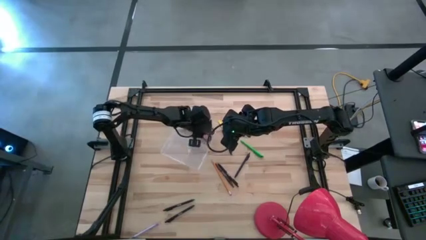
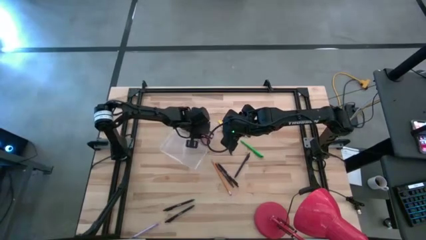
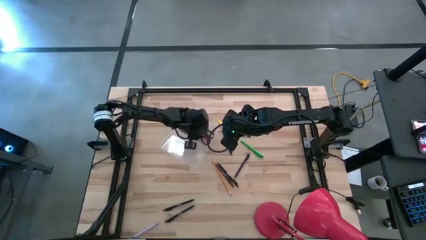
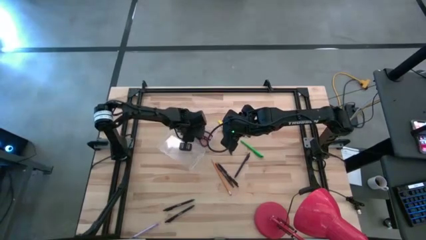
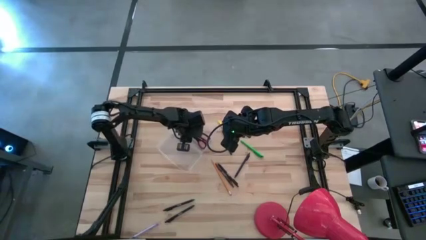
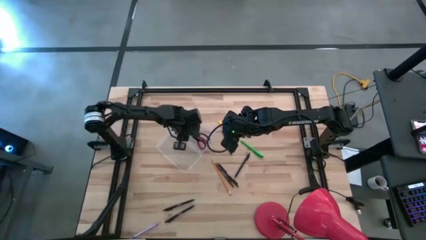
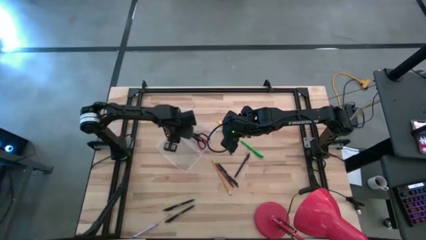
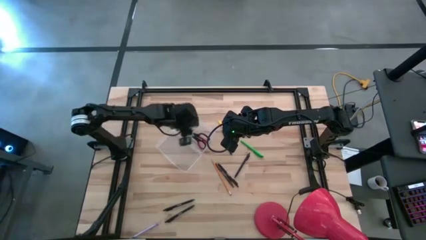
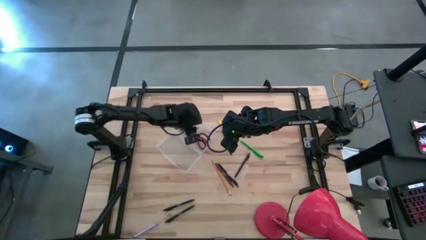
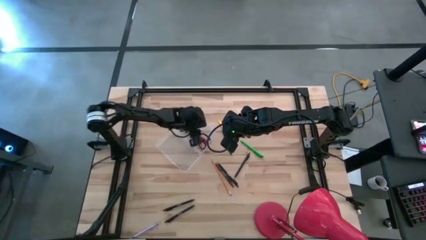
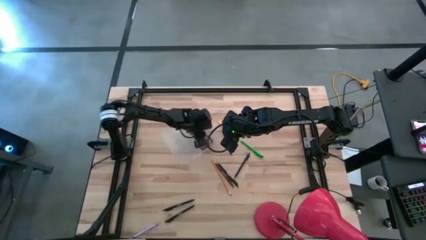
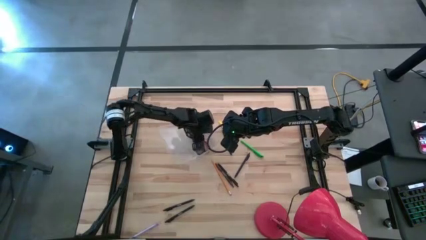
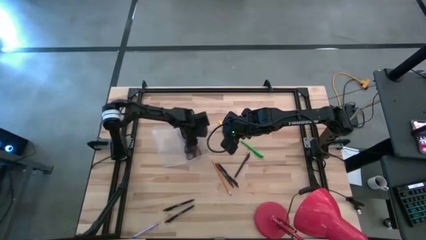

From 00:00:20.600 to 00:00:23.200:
Task: Pick & place school supplies into a supply box
Adjust the transparent supply box

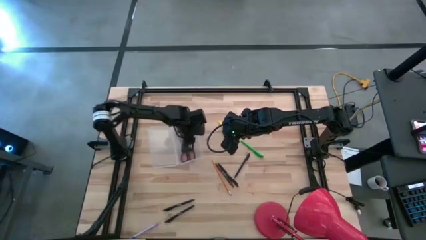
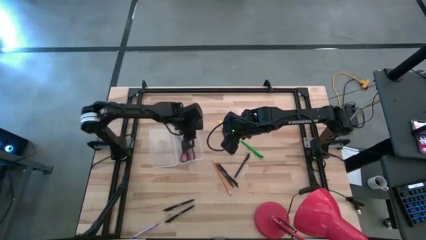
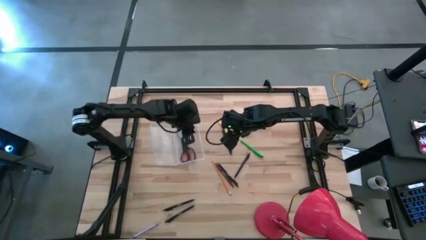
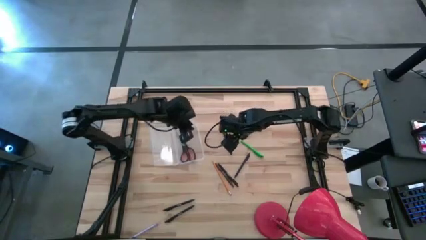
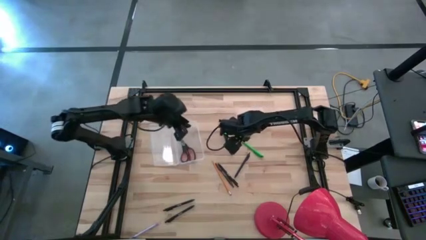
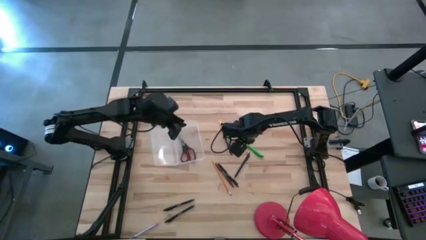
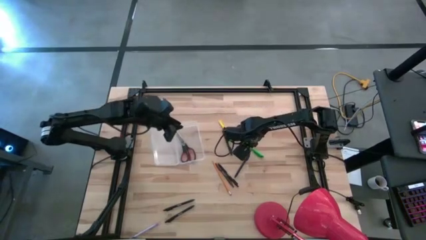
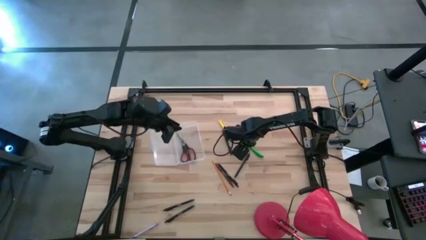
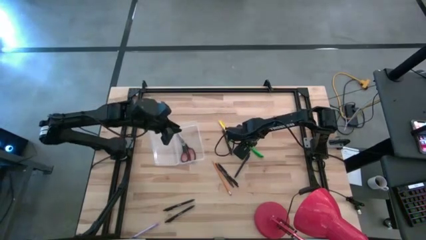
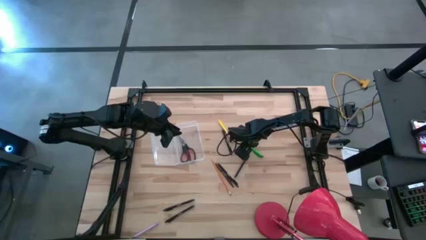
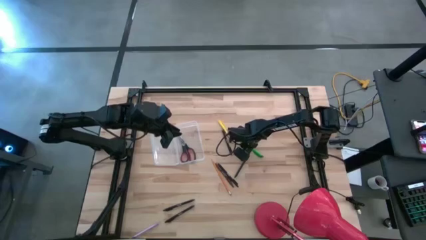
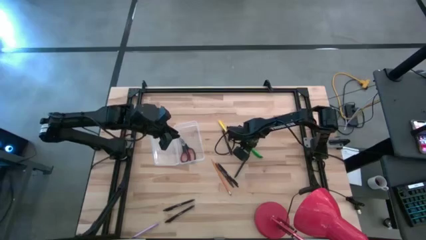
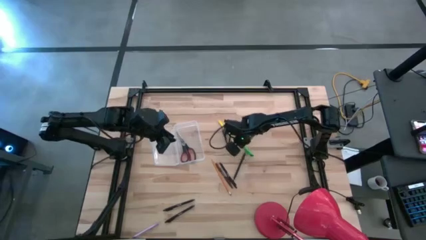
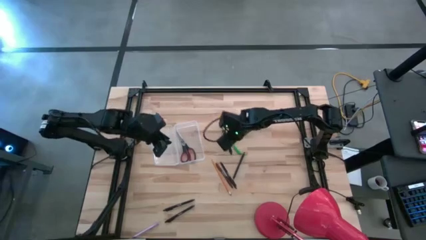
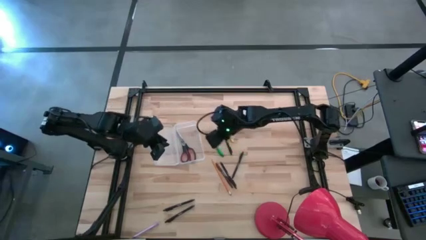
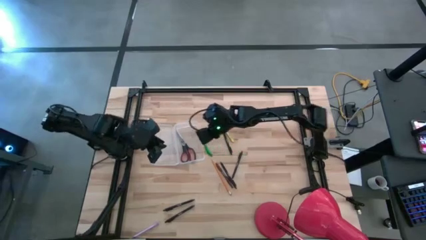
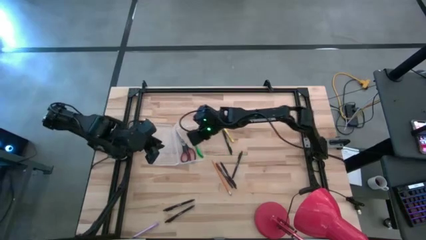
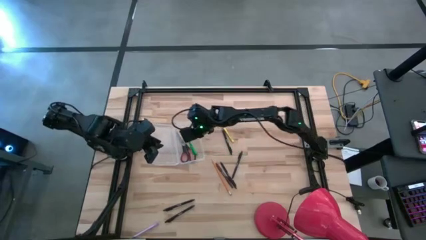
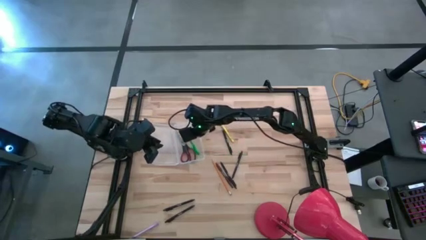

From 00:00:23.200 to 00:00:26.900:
Put the green pen into the transparent supply box

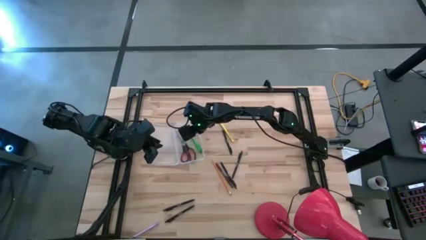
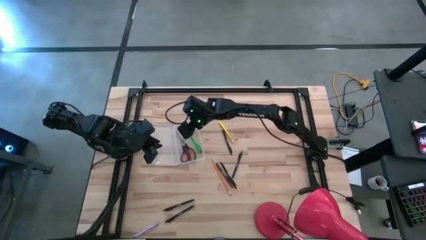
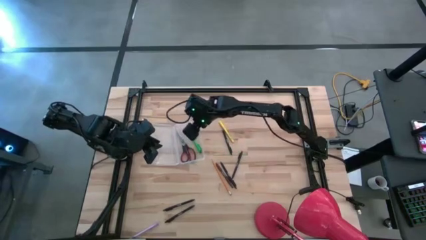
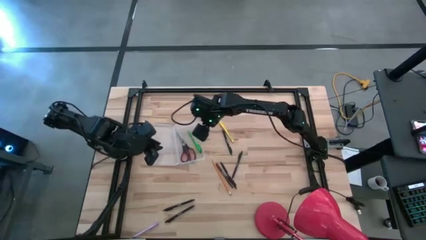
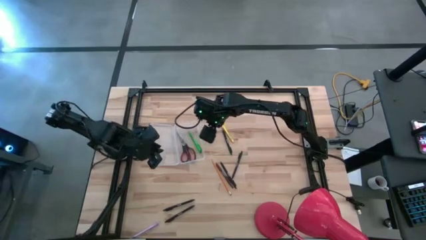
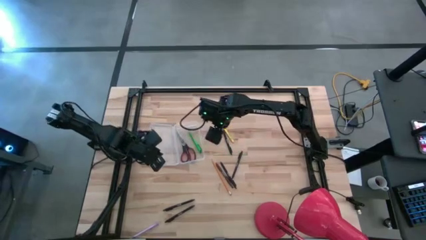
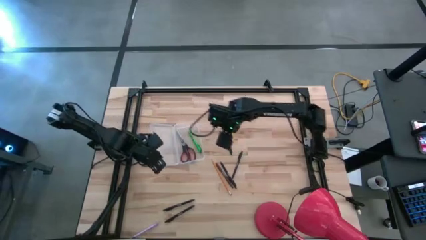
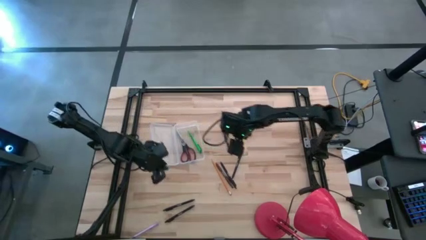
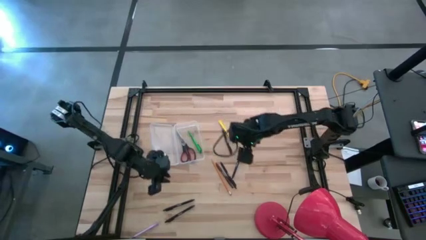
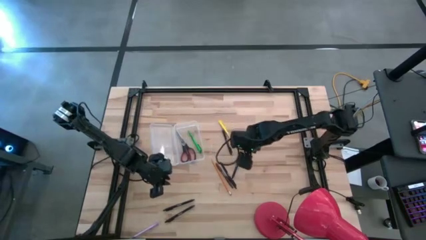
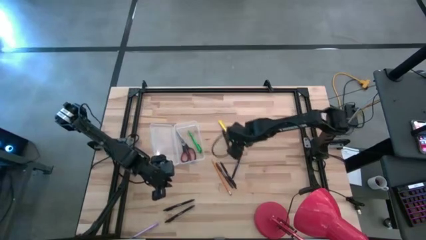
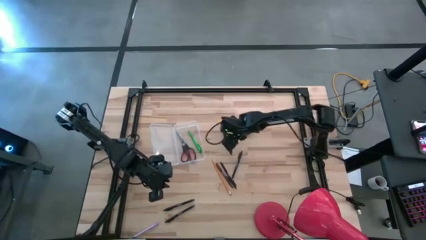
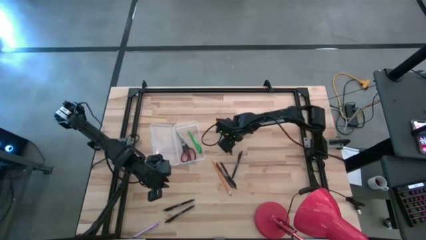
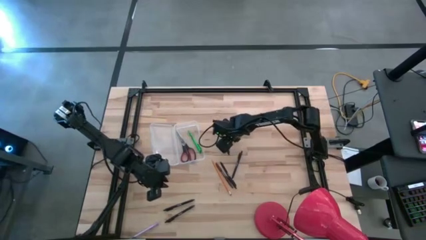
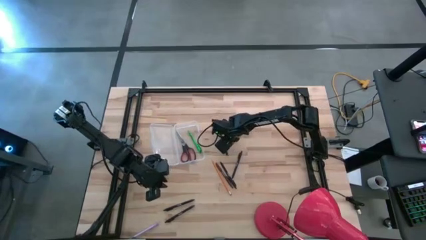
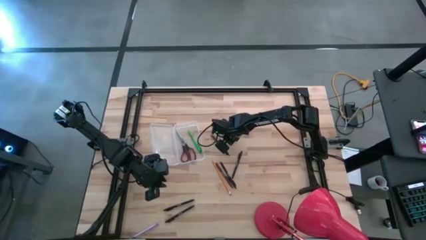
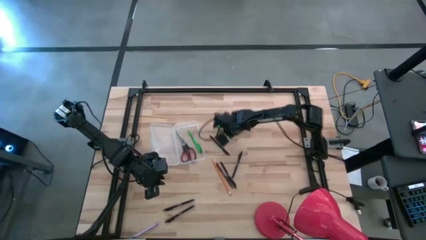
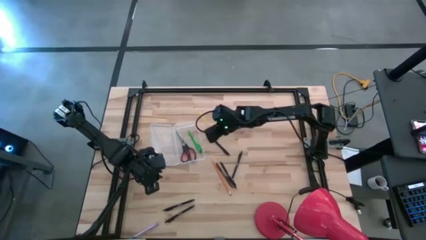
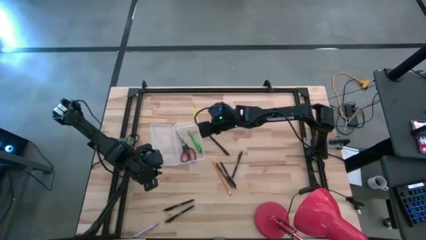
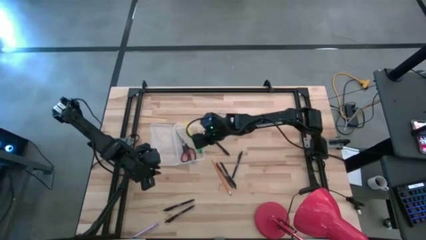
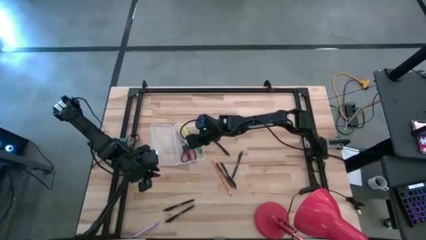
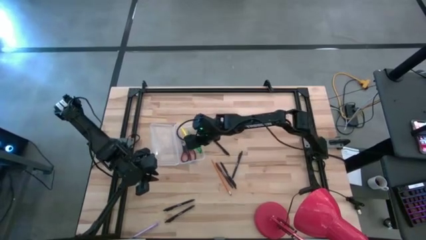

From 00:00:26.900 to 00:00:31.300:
Put the yellow pen into the transparent supply box

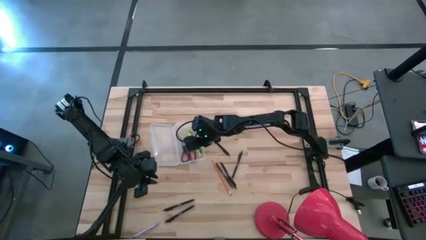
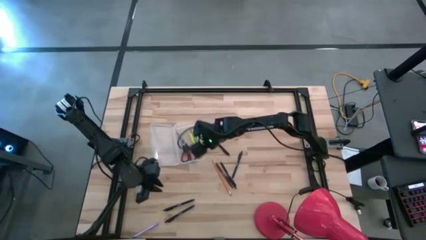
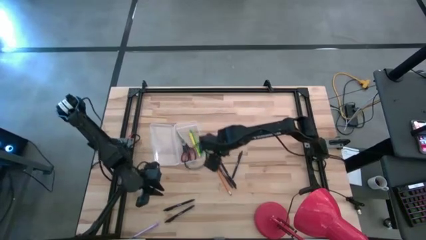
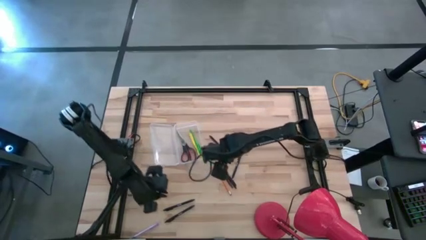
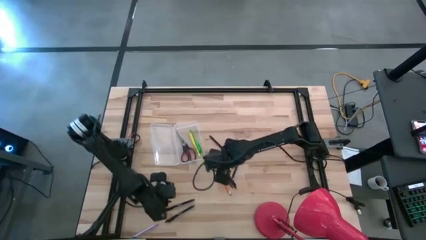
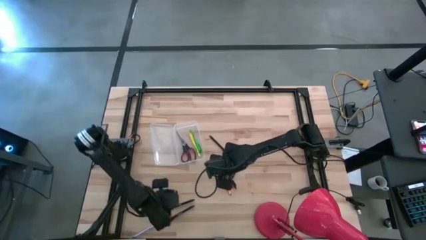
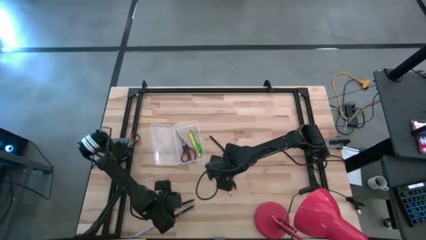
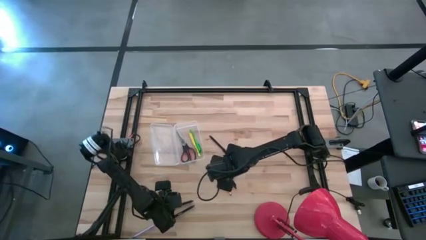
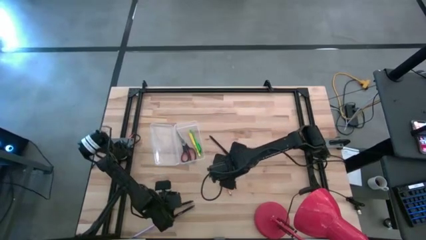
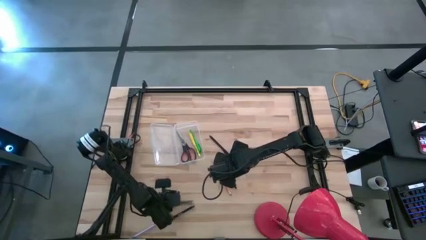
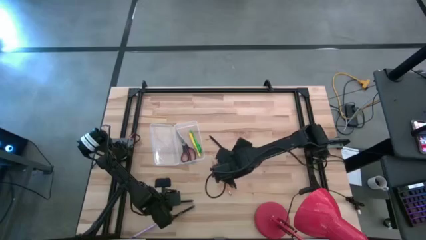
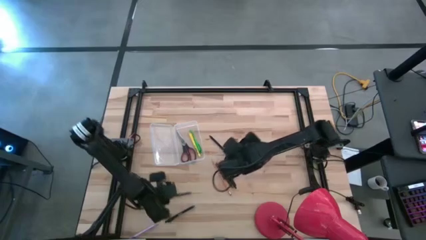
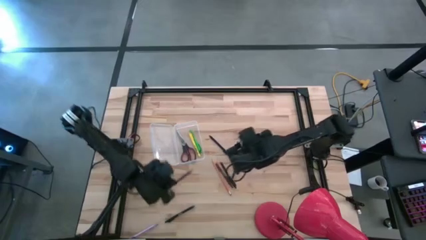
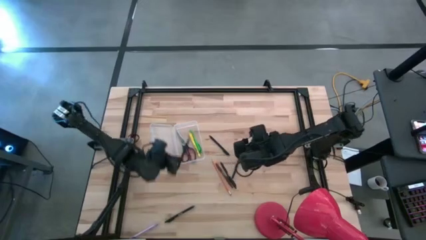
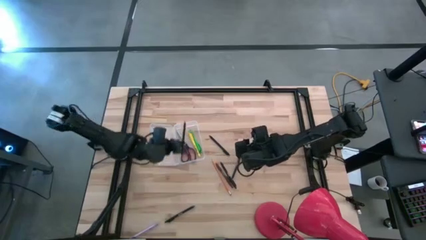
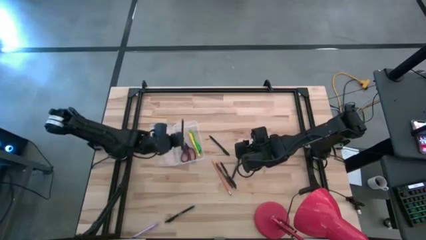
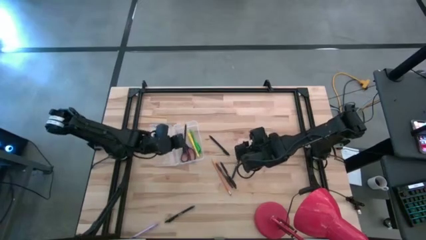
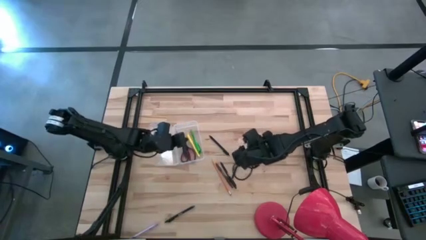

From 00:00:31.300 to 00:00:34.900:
Put the black pen into the transparent supply box

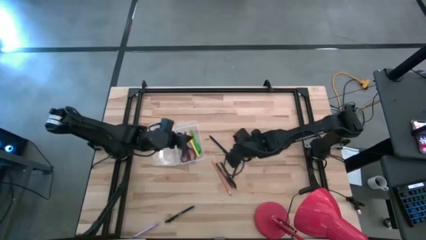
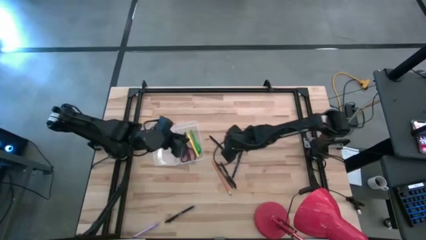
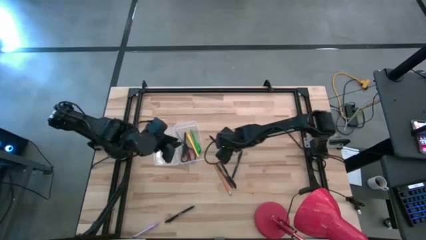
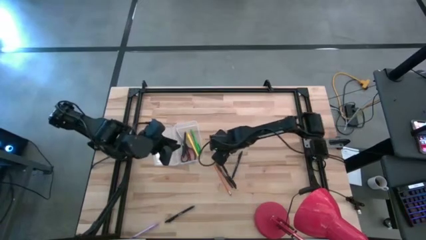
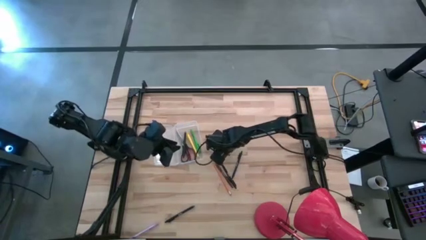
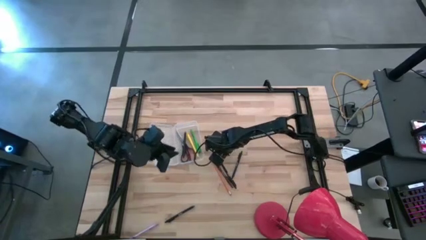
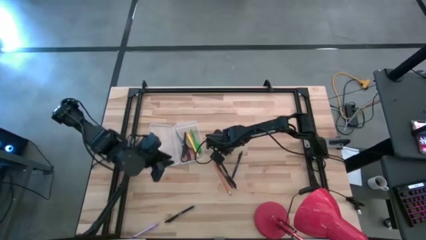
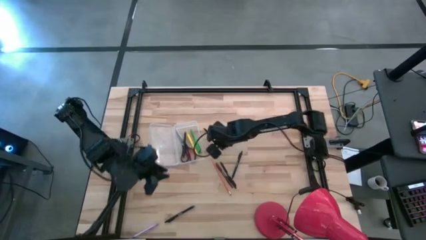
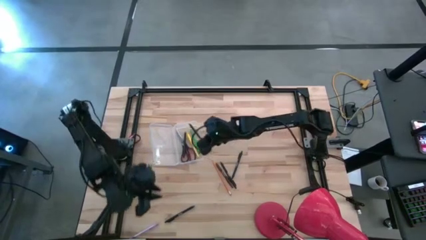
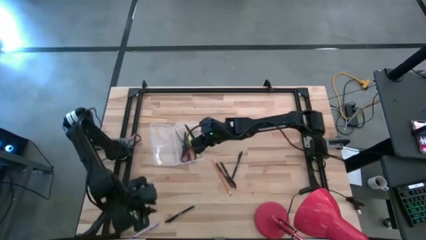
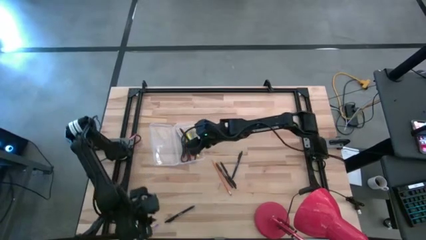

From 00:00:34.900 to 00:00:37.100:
Put the black pen into the transparent supply box

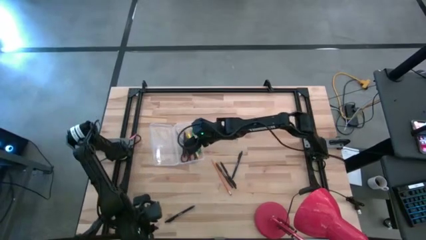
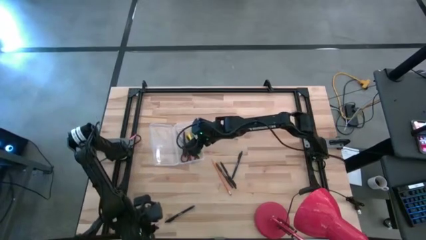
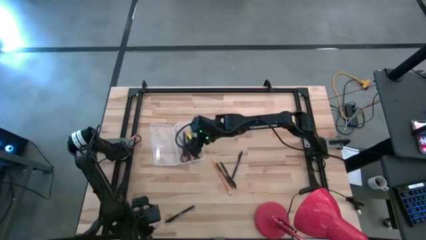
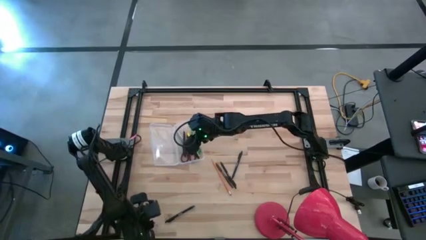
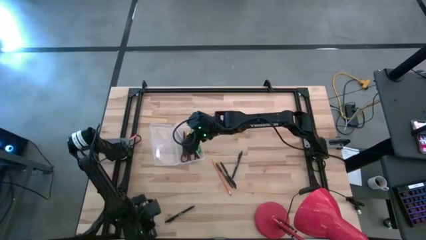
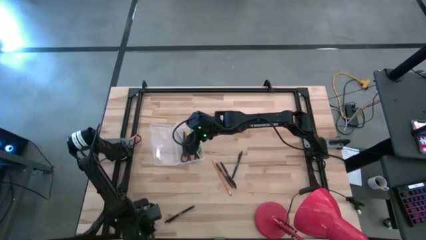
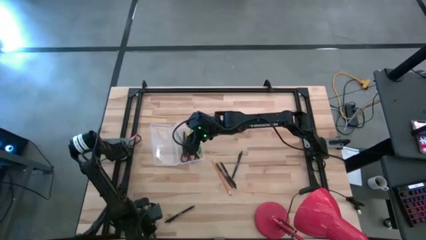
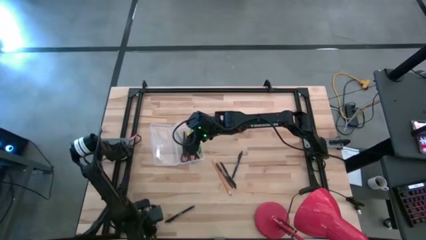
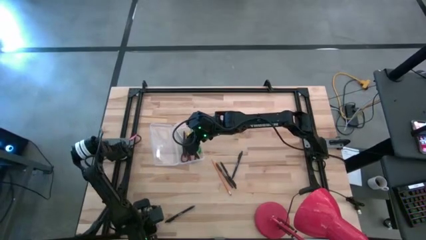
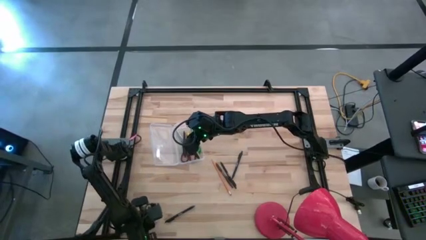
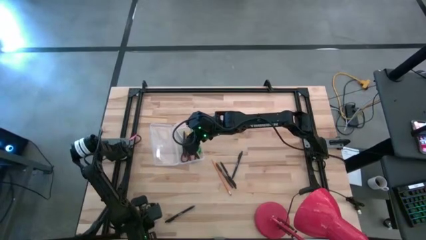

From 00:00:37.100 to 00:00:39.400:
Put the violet pen into the transparent supply box
